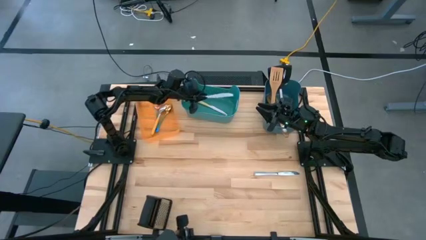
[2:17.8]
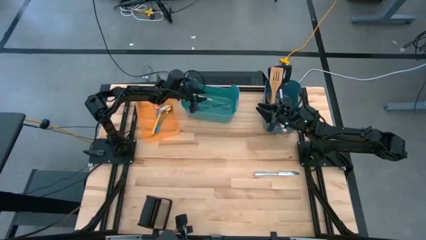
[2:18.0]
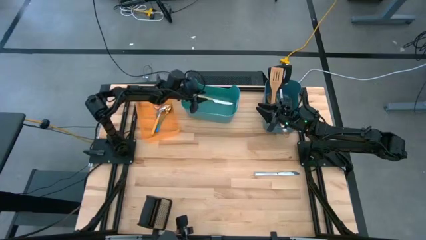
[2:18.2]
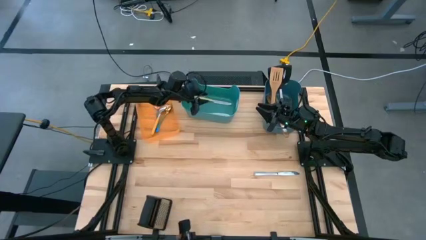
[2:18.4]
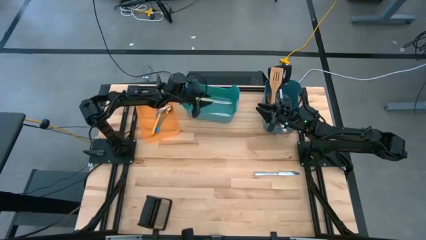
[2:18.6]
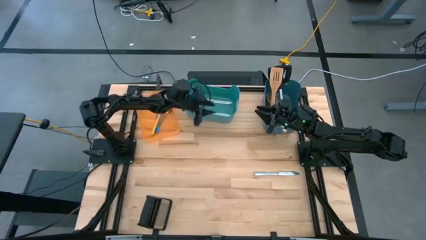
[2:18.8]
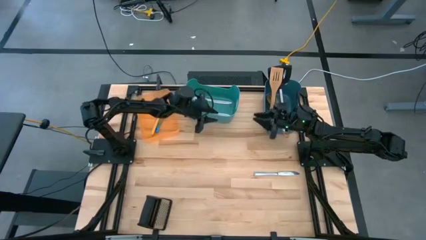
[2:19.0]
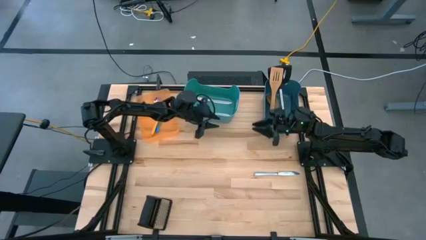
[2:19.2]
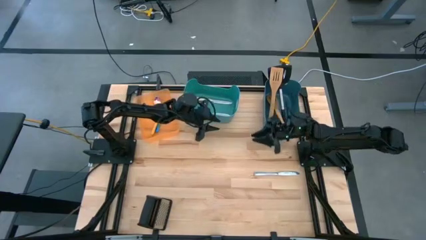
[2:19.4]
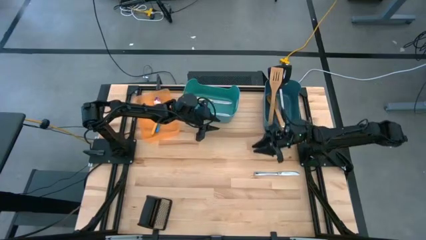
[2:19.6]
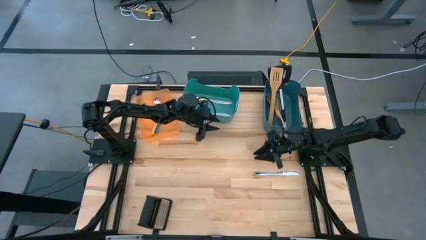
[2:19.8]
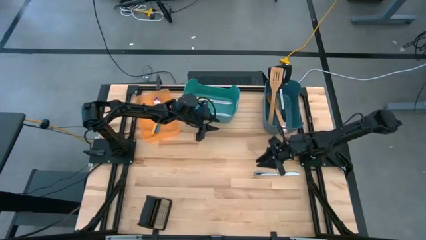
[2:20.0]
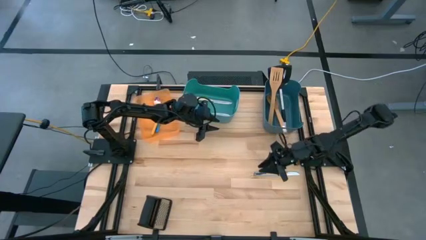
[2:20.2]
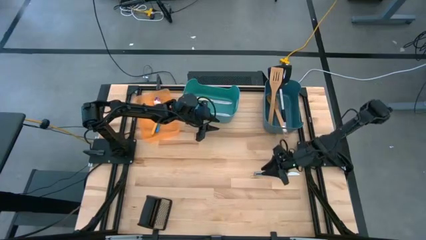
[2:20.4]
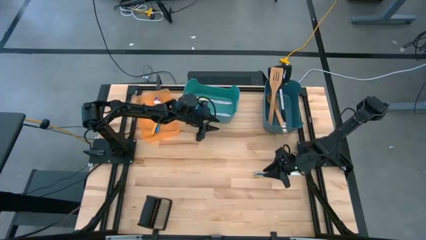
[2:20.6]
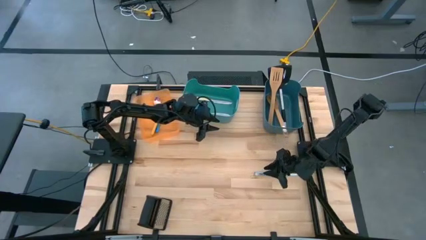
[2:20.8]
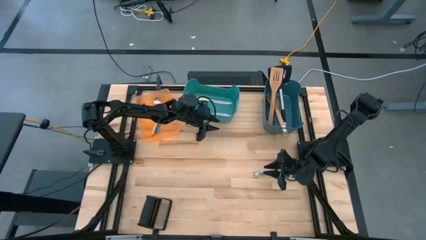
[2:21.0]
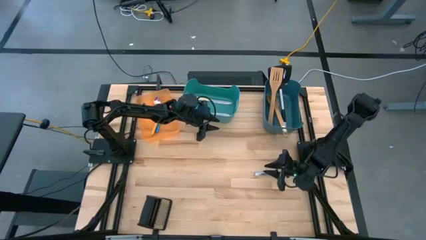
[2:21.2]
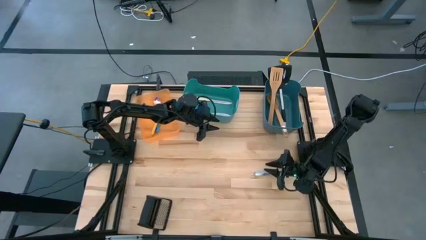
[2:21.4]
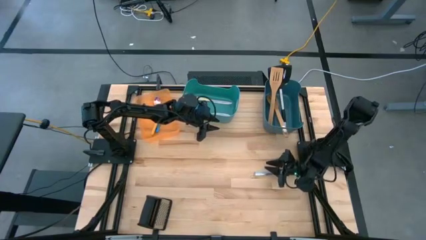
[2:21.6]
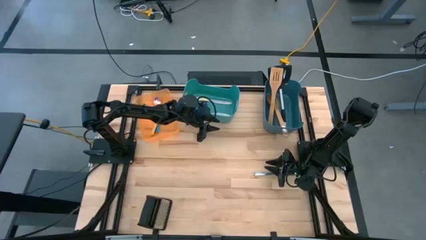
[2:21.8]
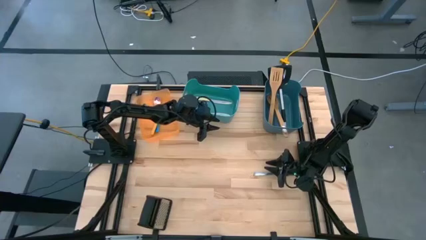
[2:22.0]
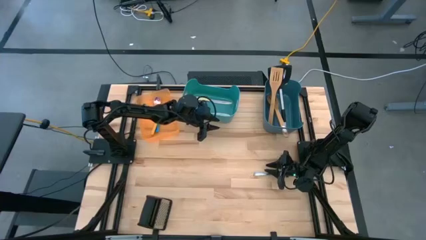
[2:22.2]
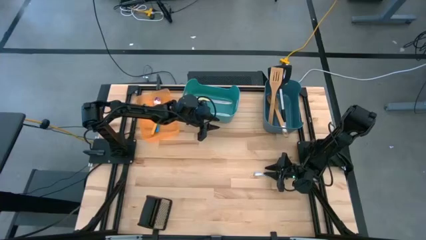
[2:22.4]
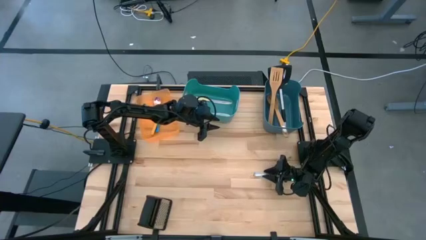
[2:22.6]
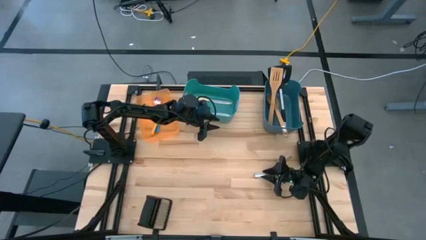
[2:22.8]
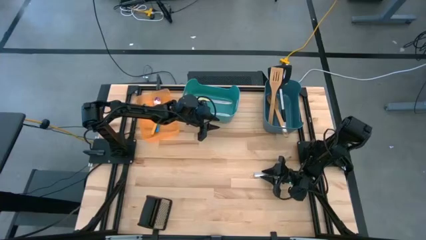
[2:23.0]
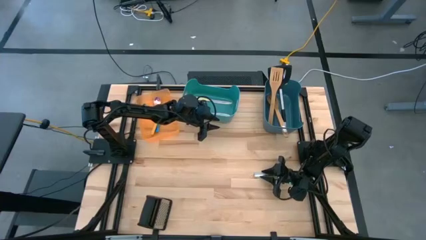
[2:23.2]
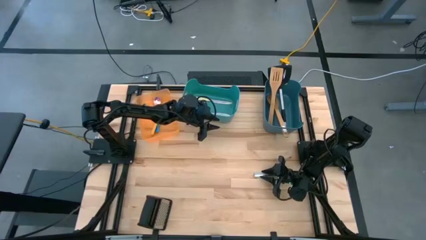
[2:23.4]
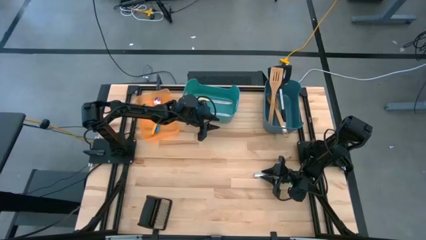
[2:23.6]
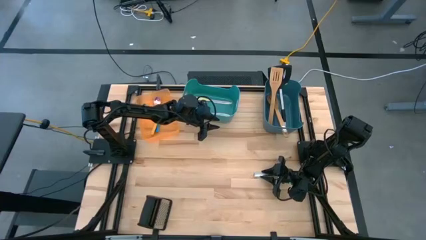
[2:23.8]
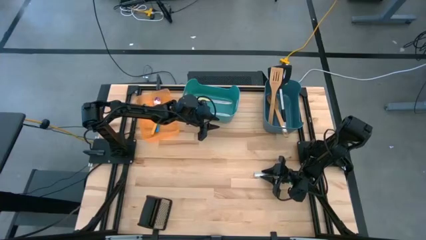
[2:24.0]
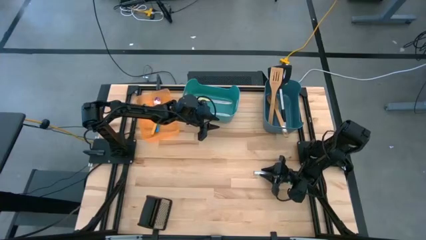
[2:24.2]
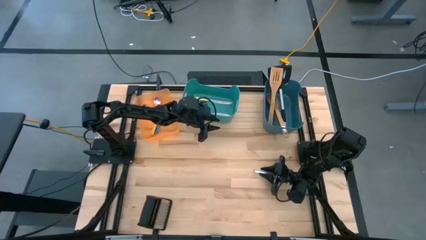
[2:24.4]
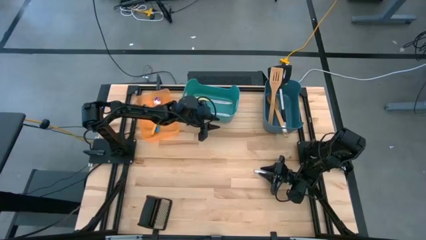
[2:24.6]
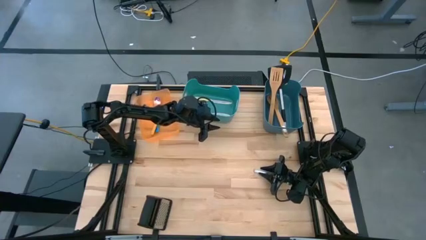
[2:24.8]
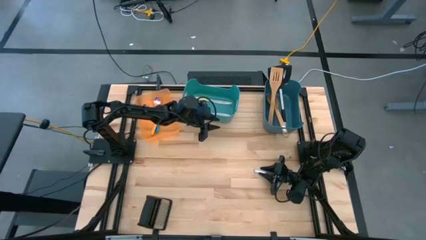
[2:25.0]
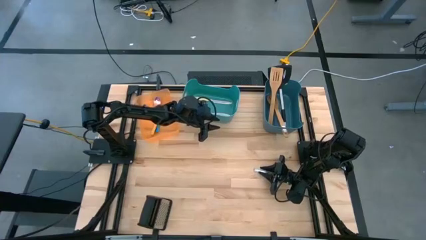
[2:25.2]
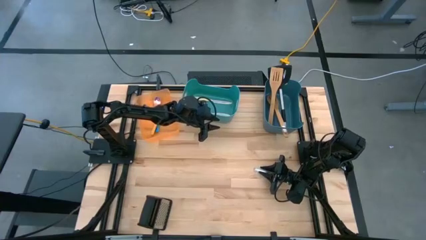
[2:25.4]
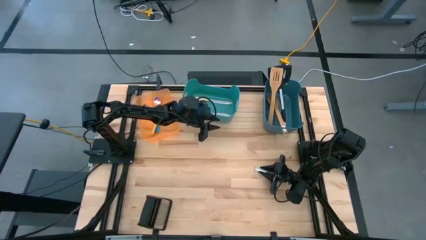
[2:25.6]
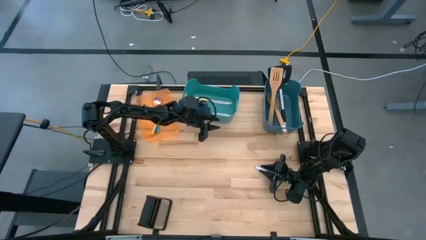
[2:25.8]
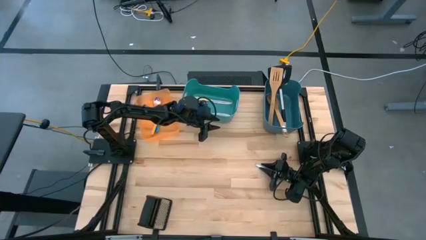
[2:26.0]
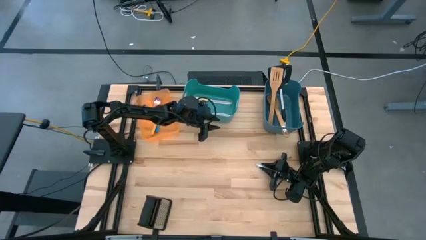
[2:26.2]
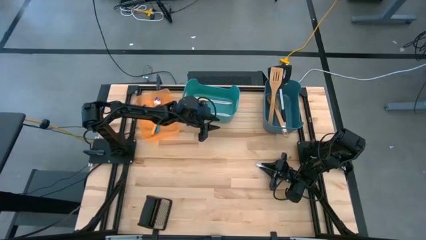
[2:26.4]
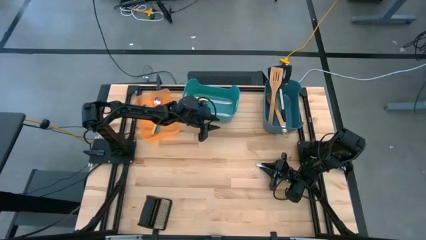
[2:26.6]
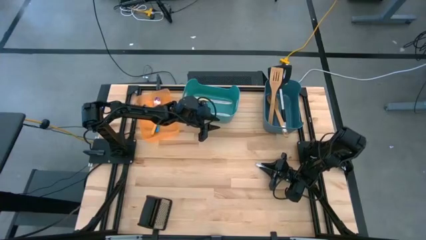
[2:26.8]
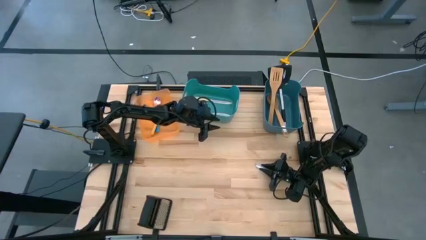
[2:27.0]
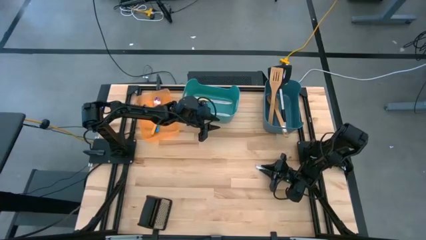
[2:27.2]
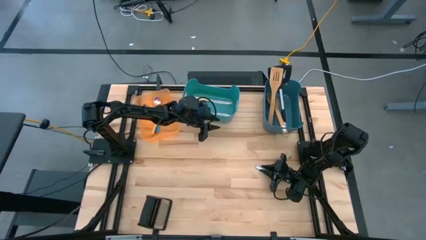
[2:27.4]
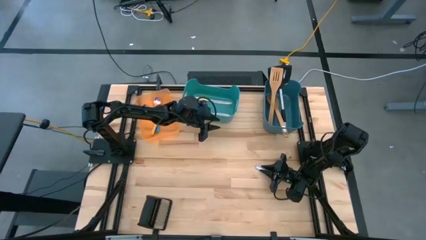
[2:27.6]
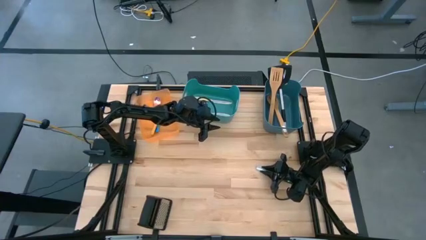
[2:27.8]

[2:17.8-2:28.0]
Task: Pick & Place Kitchen Items
Put the silver knife into the green bin
